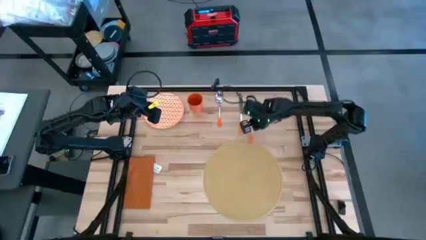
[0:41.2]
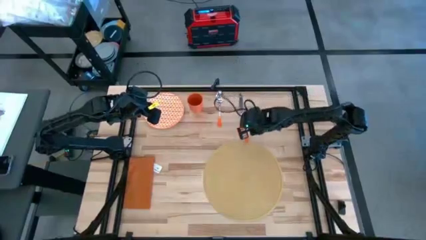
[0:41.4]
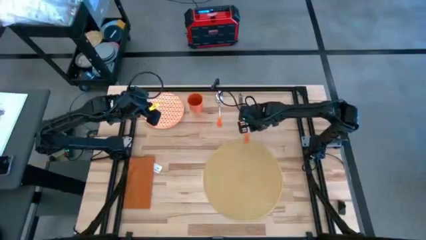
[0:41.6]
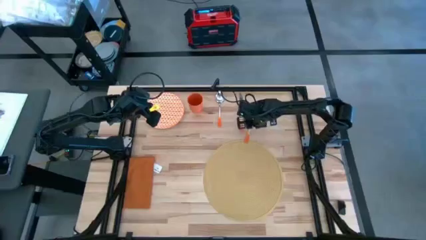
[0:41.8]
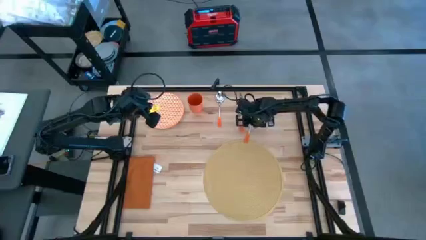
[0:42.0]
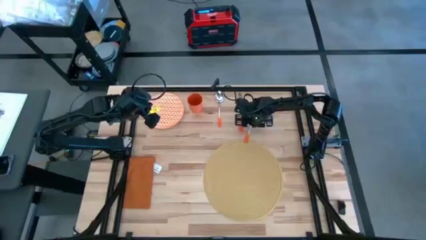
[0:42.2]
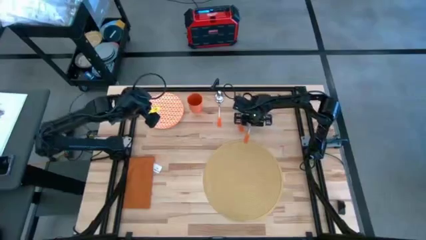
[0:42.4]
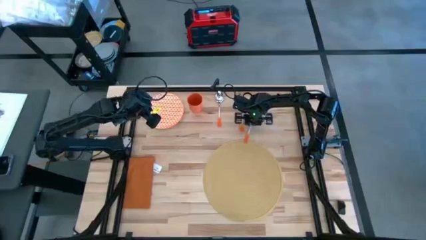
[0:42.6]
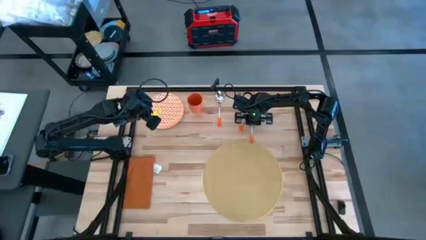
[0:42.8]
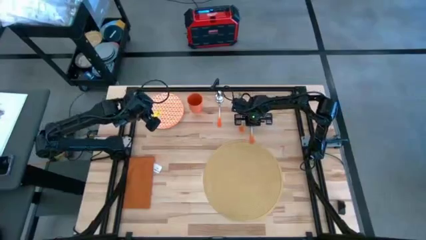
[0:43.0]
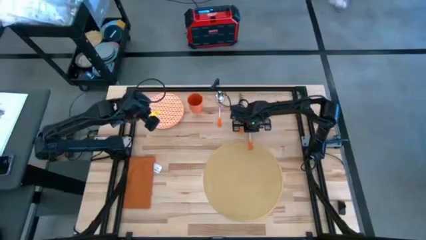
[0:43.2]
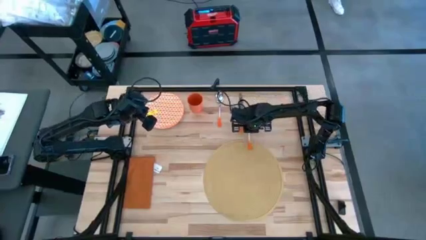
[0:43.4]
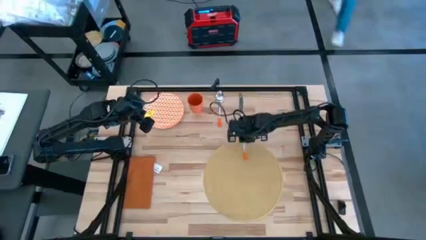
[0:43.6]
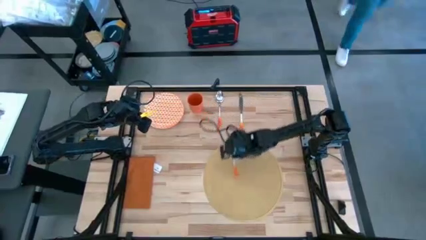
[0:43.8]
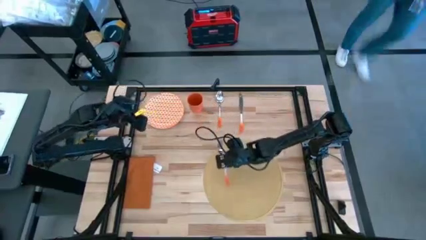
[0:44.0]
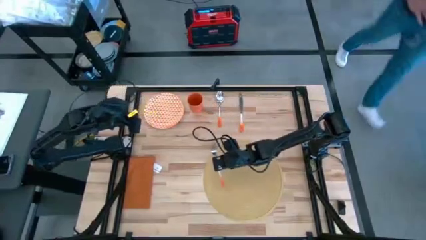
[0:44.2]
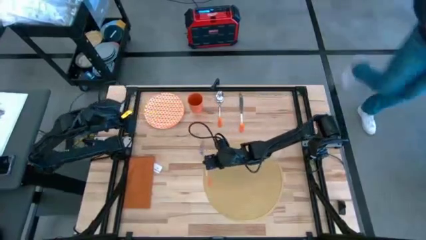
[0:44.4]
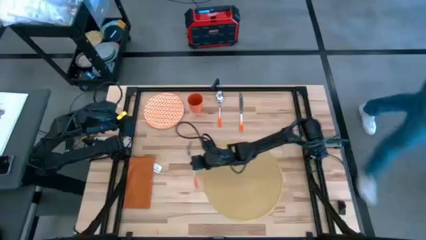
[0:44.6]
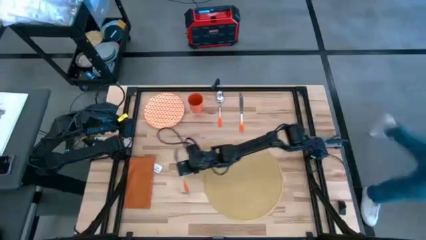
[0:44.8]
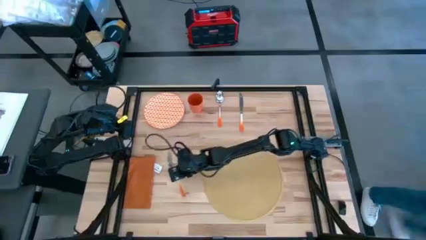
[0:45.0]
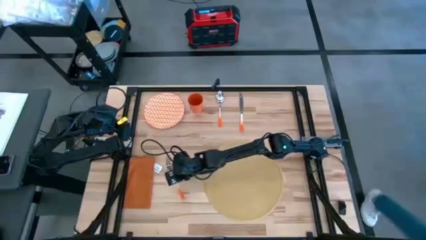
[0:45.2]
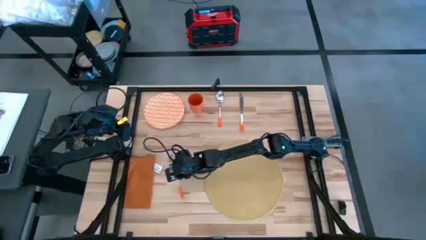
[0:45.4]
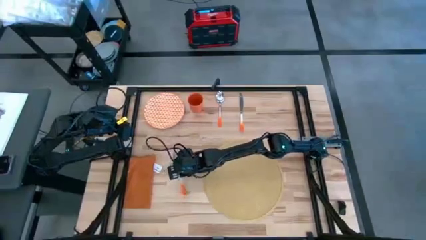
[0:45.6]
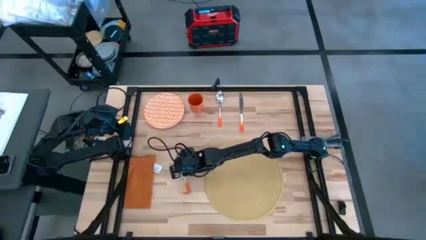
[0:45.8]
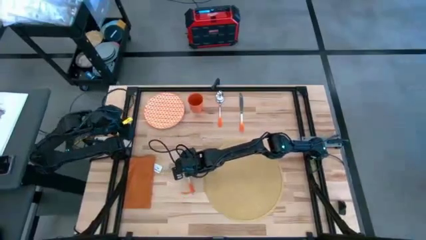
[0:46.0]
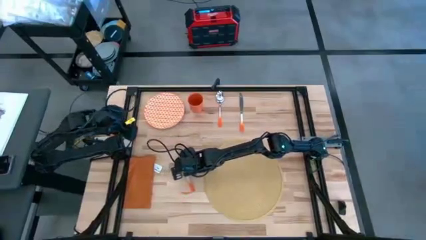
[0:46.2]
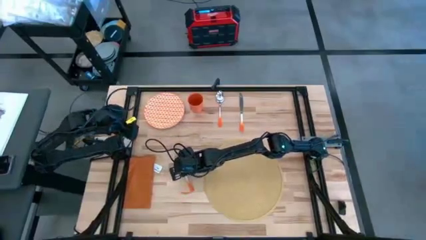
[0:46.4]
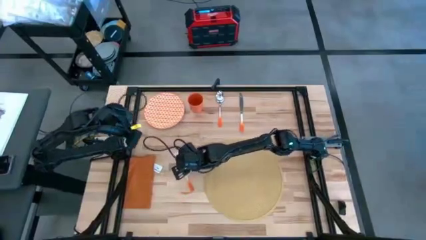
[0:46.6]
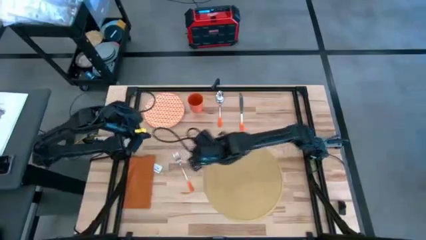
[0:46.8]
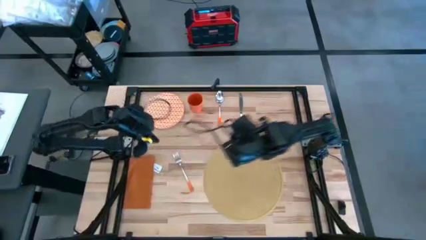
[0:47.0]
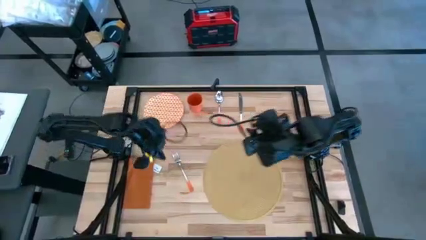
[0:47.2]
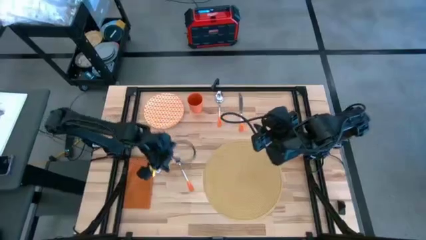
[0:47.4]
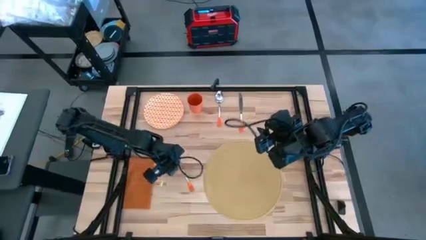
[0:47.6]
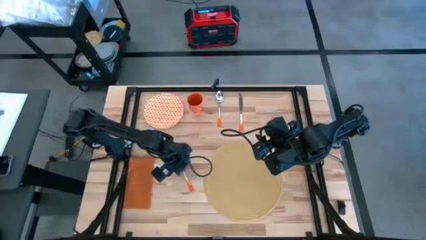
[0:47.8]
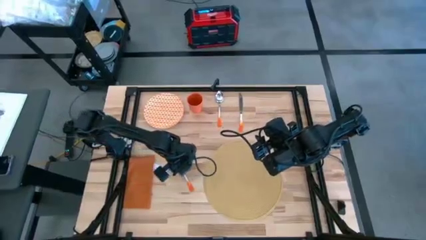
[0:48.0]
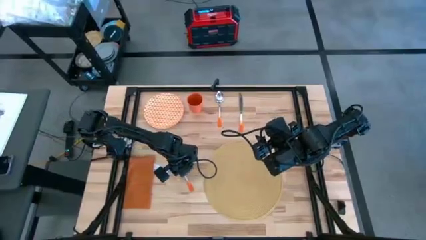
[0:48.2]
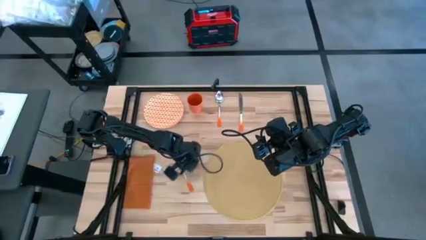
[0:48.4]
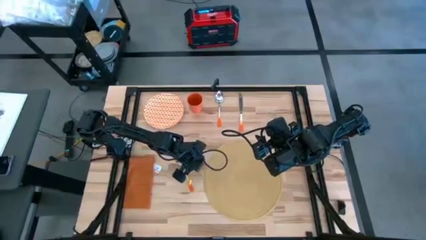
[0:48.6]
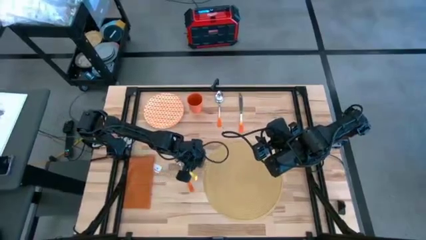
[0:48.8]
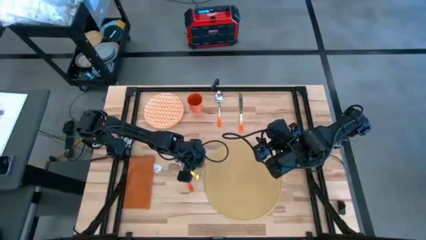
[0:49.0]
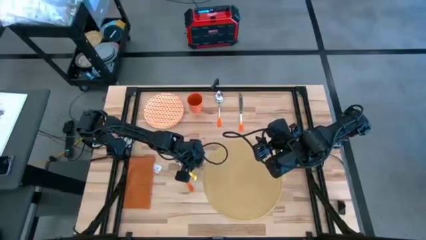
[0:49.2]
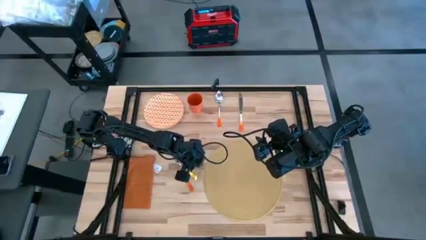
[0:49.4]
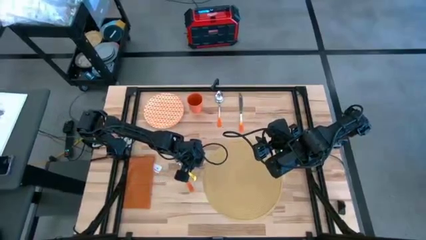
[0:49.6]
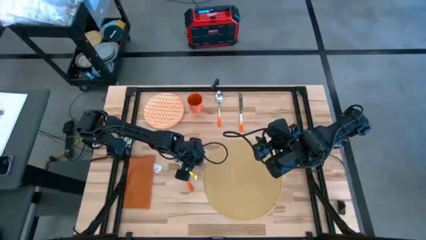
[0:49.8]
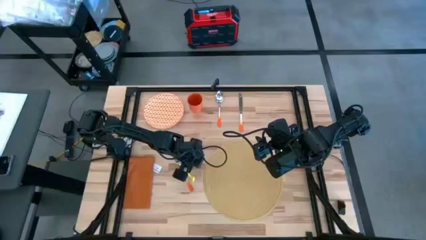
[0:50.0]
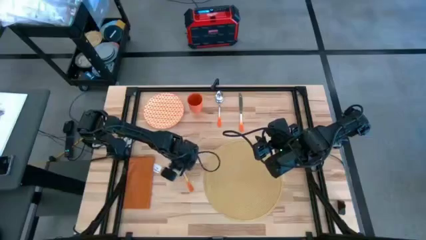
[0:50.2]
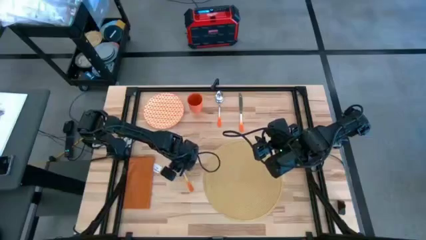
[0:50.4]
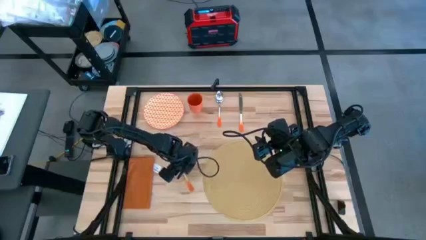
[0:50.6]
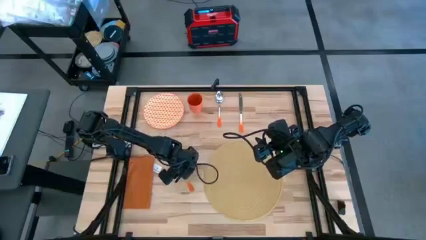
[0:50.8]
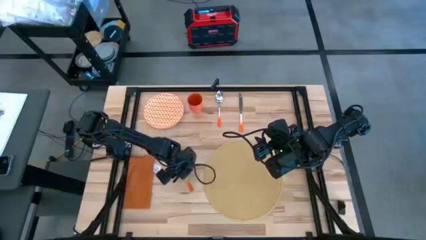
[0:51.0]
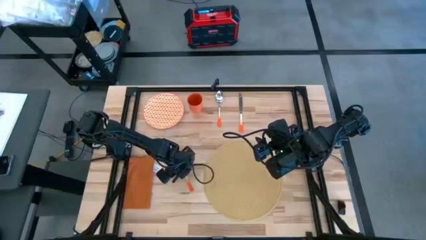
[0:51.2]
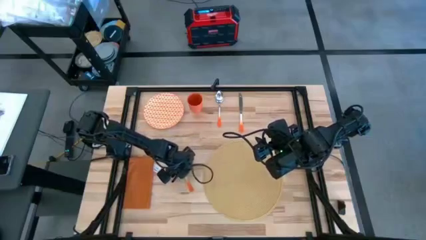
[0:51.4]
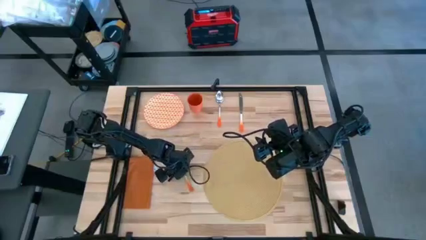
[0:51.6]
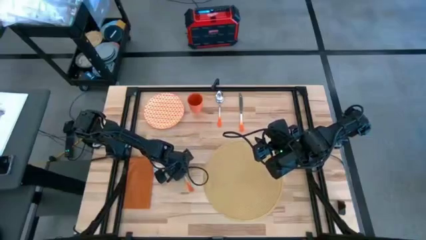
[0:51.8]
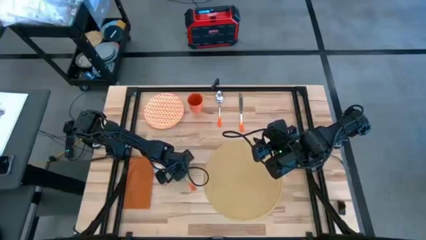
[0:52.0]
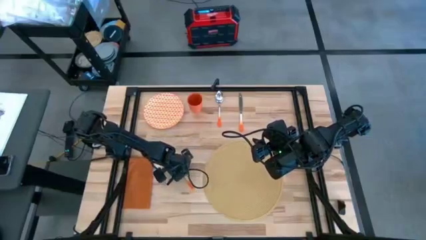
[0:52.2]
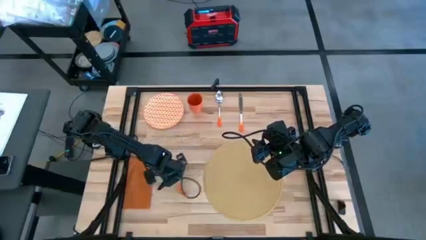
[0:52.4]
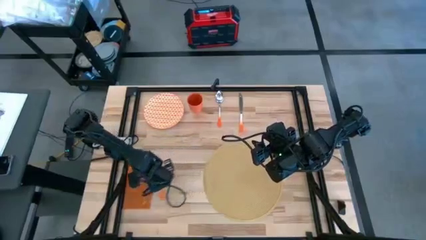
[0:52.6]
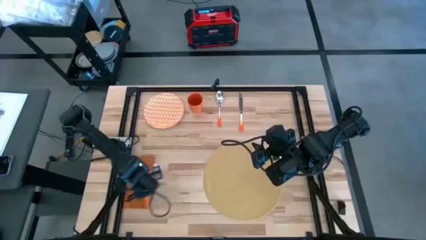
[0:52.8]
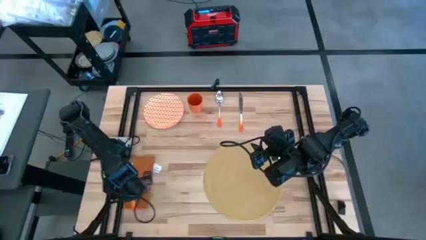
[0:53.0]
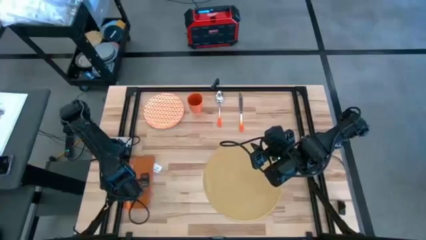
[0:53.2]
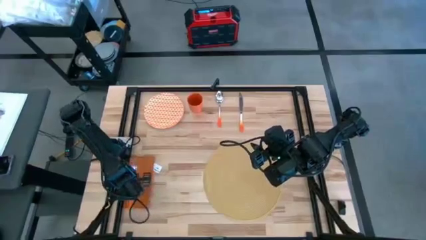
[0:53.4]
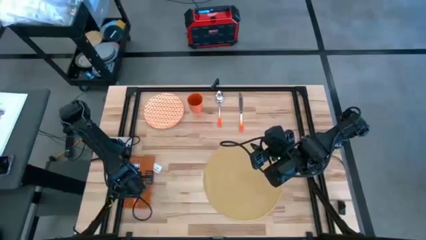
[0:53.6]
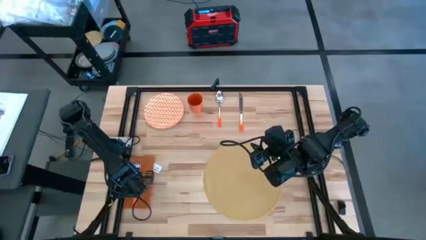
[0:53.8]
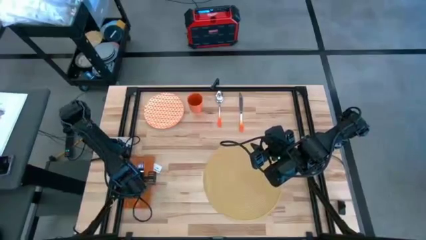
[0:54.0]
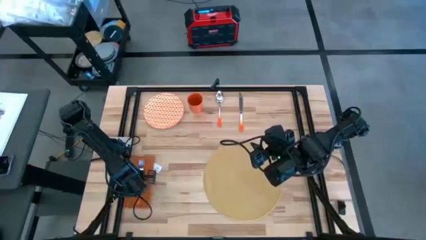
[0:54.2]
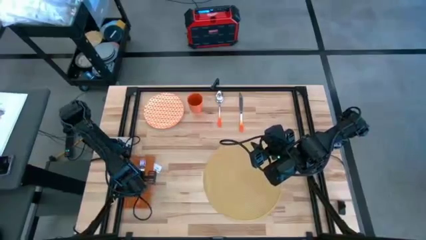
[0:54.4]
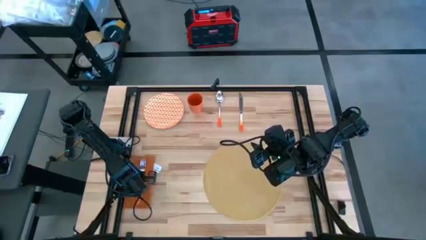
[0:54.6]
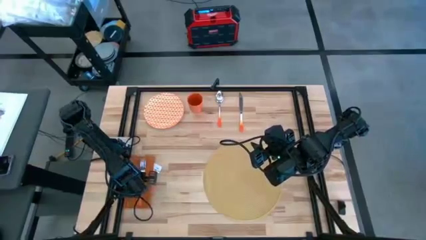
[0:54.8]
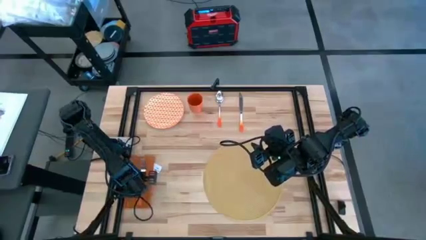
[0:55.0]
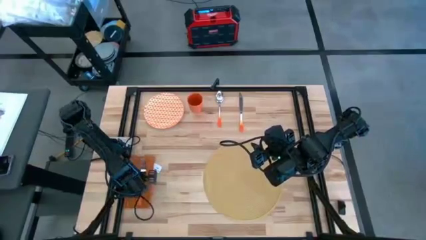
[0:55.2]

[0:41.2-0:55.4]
Task: Set table place
Put the orange fork on the orange table napkin
